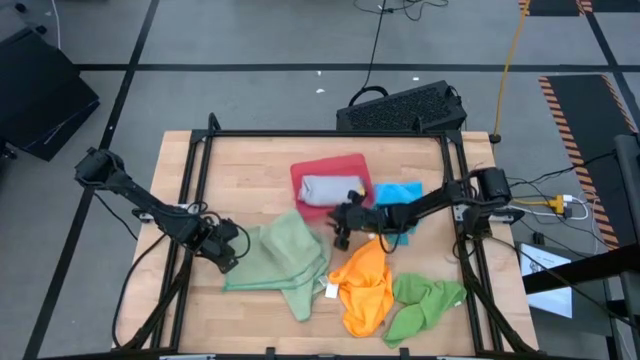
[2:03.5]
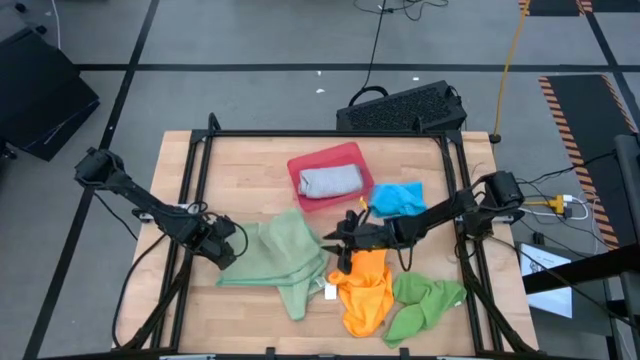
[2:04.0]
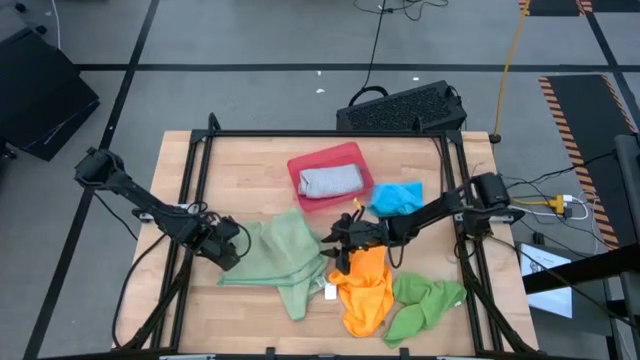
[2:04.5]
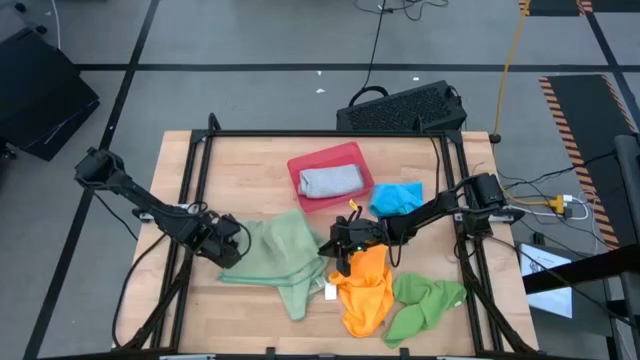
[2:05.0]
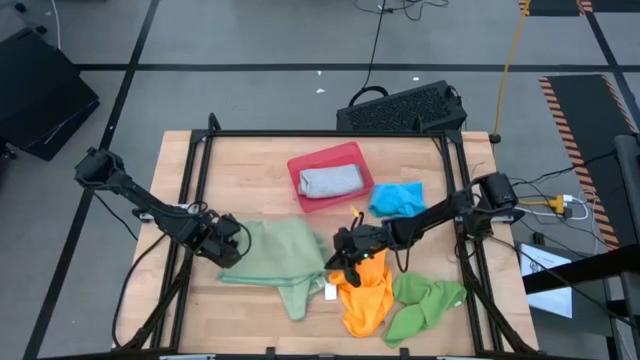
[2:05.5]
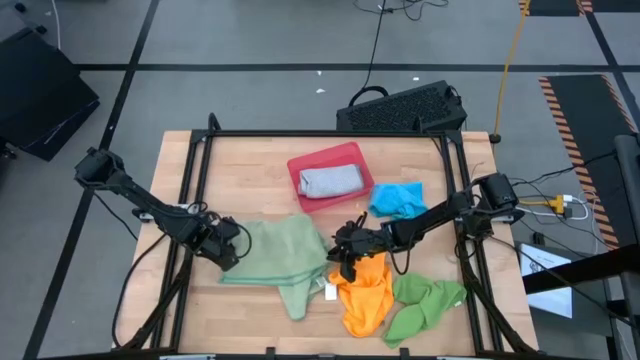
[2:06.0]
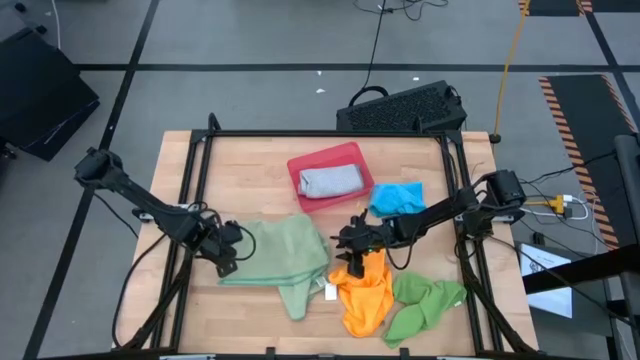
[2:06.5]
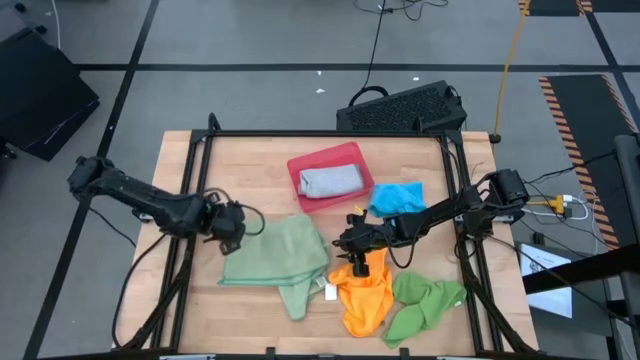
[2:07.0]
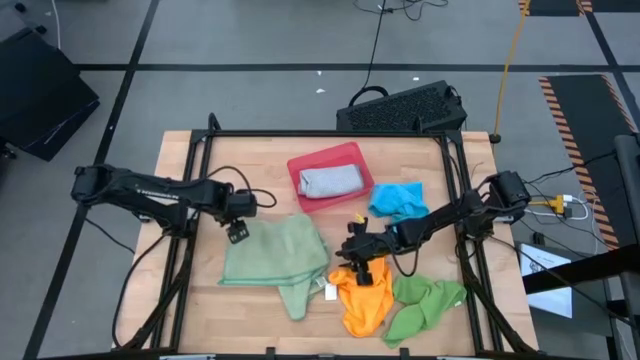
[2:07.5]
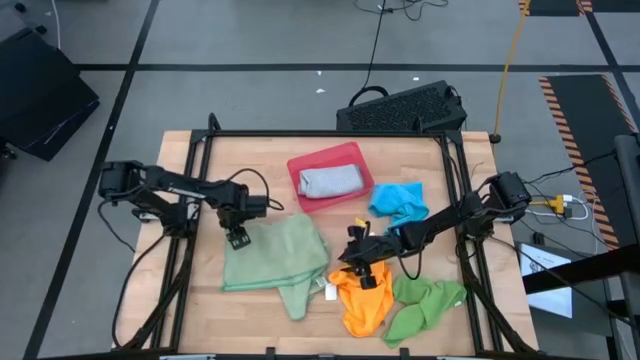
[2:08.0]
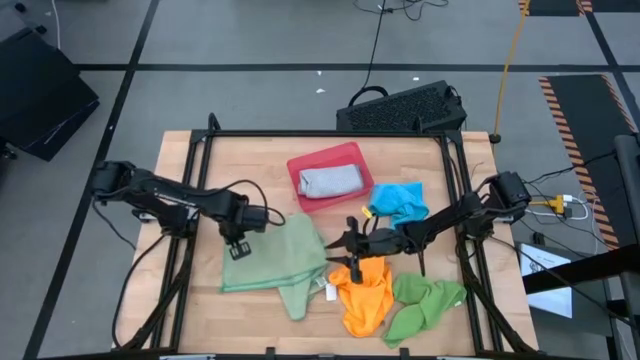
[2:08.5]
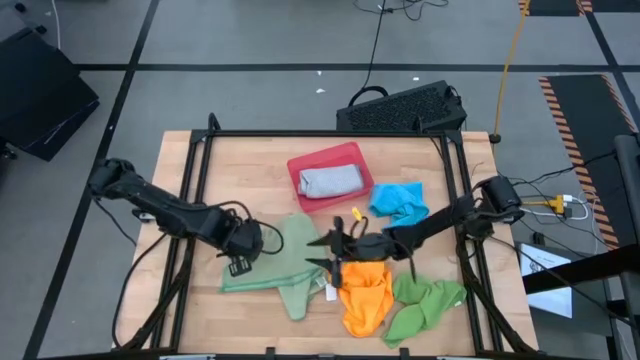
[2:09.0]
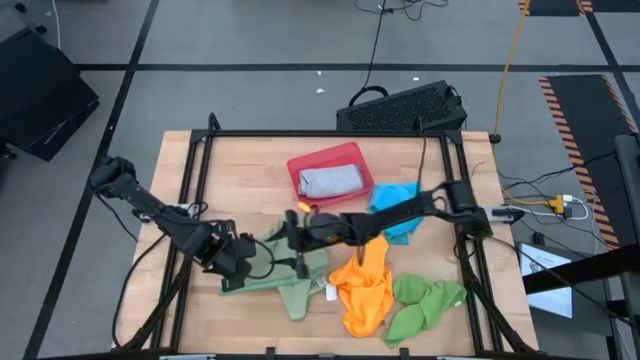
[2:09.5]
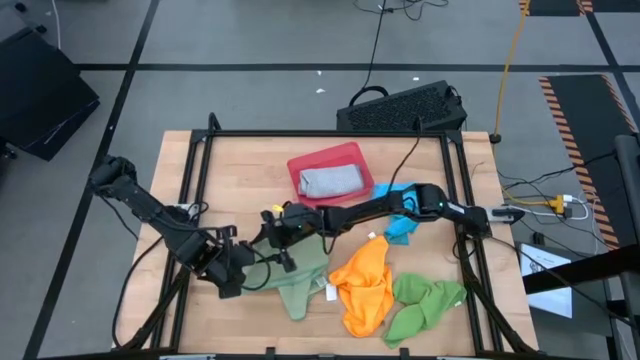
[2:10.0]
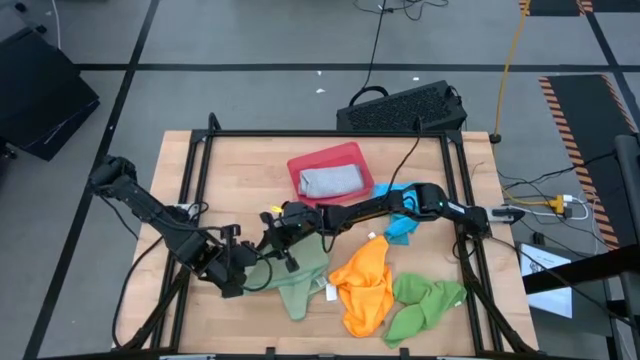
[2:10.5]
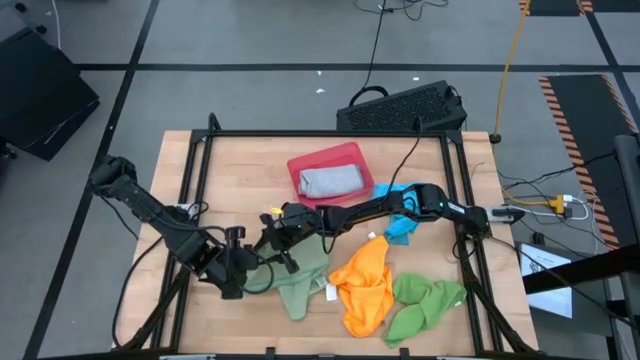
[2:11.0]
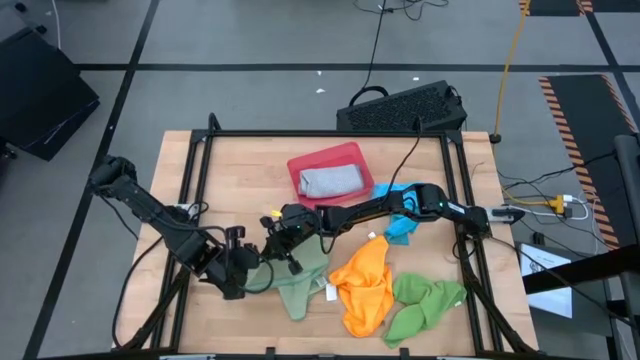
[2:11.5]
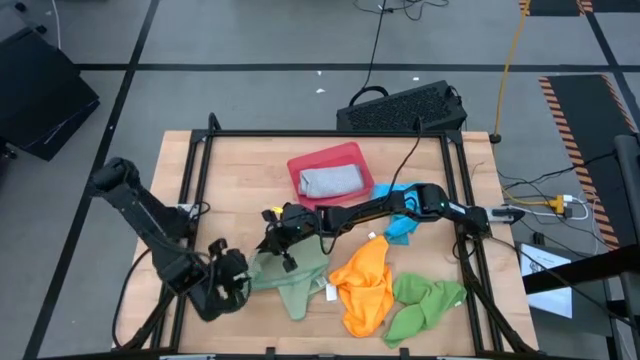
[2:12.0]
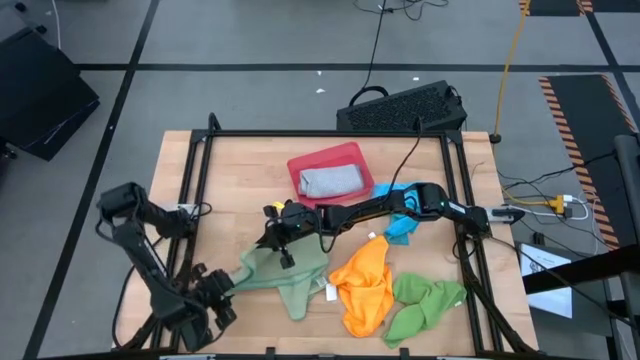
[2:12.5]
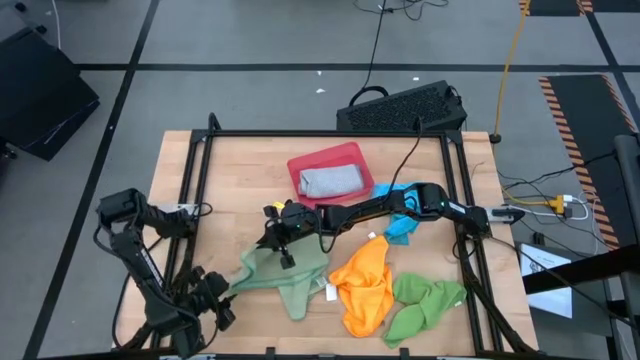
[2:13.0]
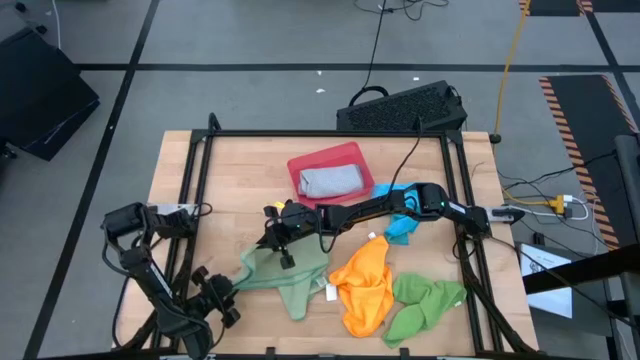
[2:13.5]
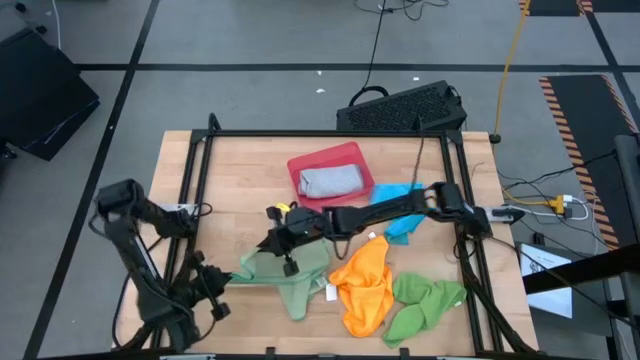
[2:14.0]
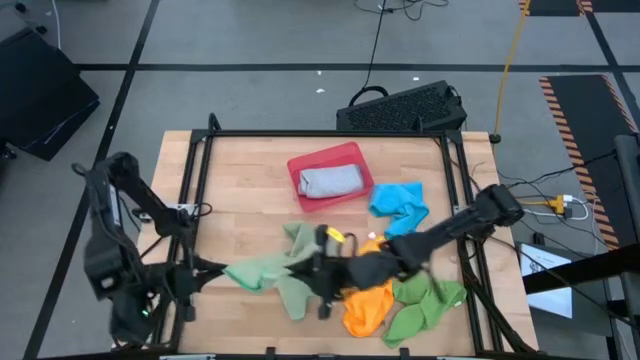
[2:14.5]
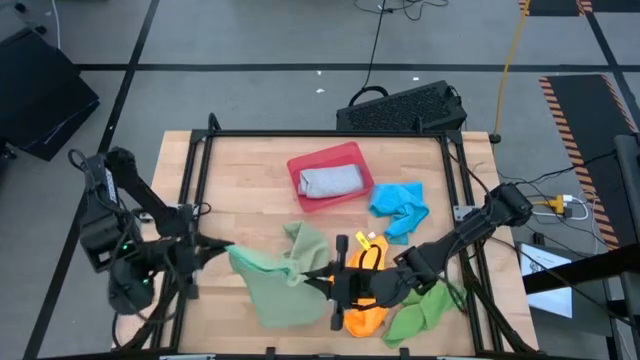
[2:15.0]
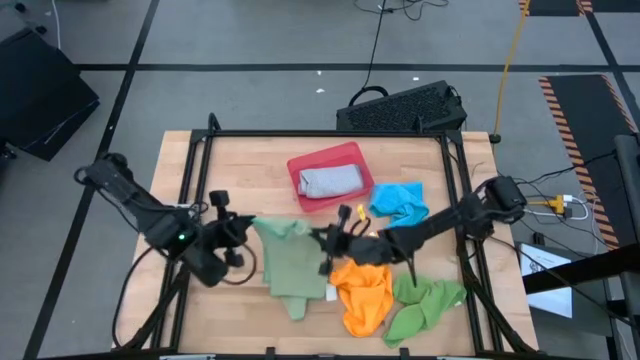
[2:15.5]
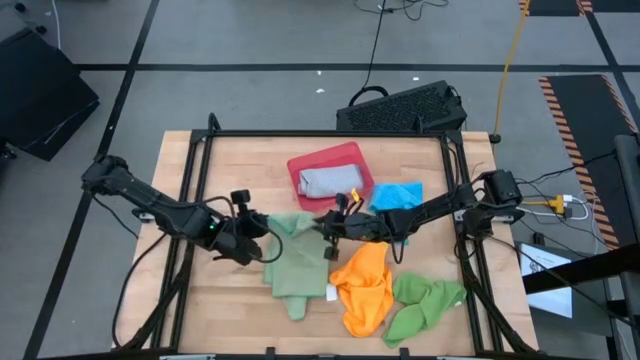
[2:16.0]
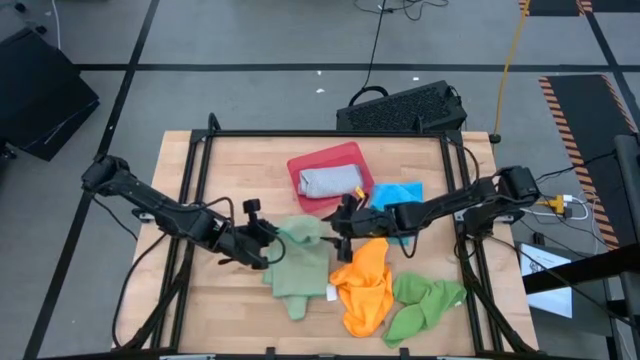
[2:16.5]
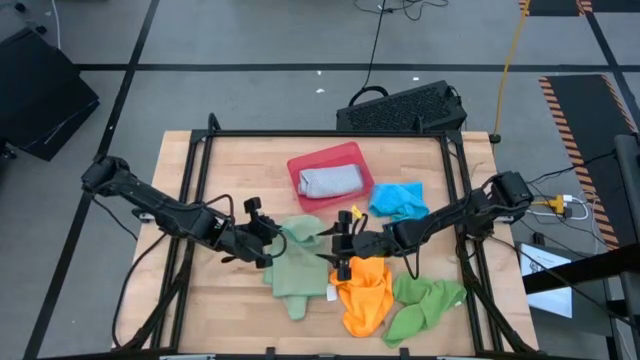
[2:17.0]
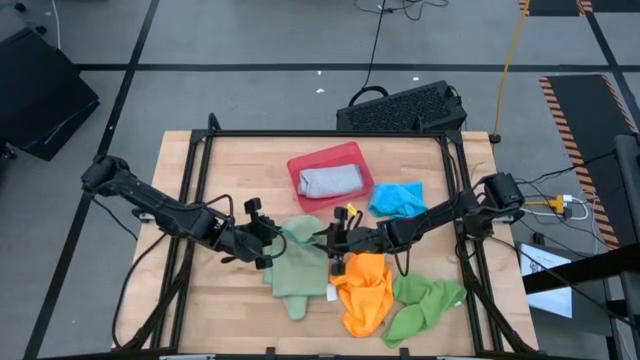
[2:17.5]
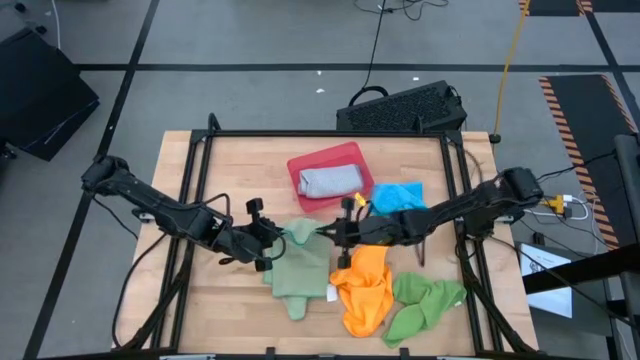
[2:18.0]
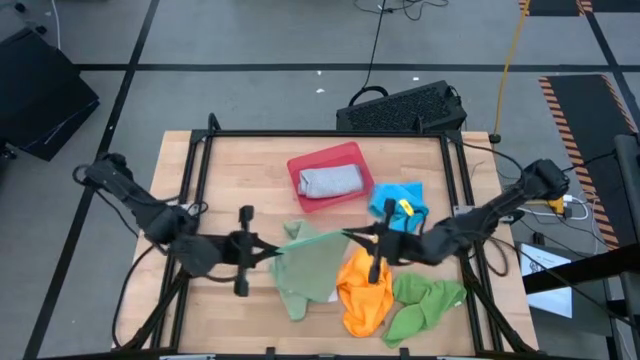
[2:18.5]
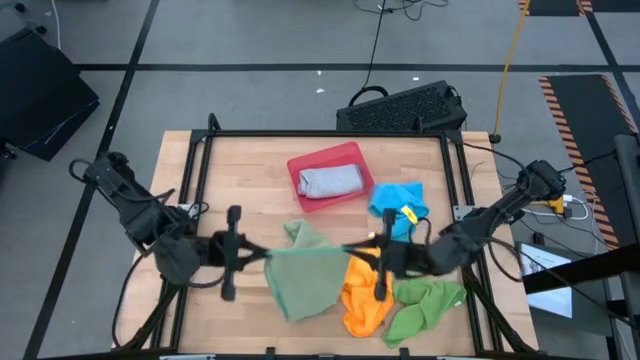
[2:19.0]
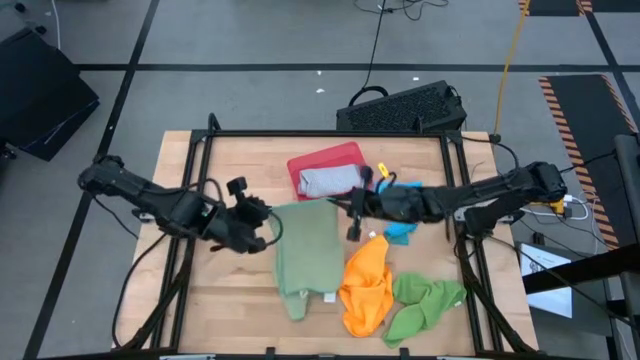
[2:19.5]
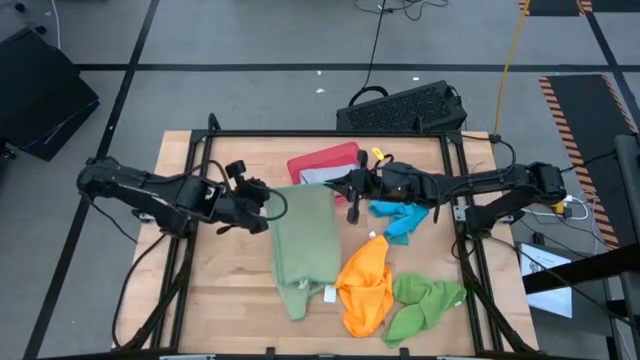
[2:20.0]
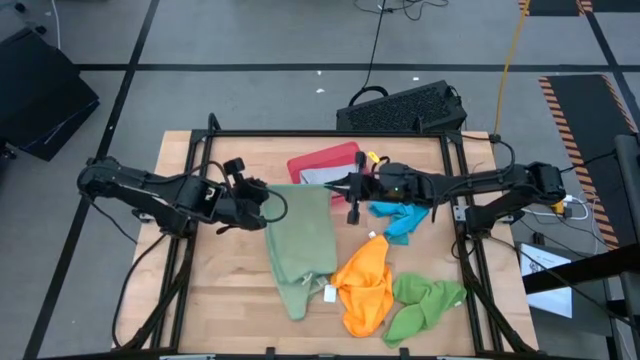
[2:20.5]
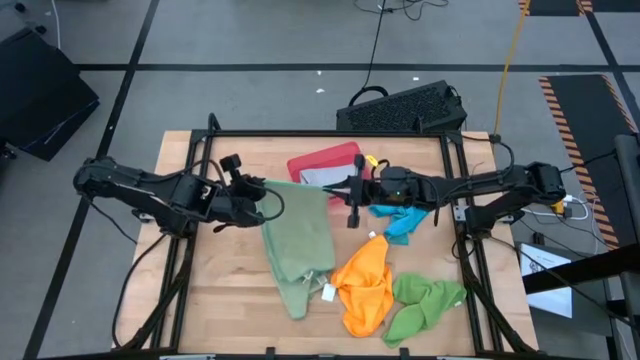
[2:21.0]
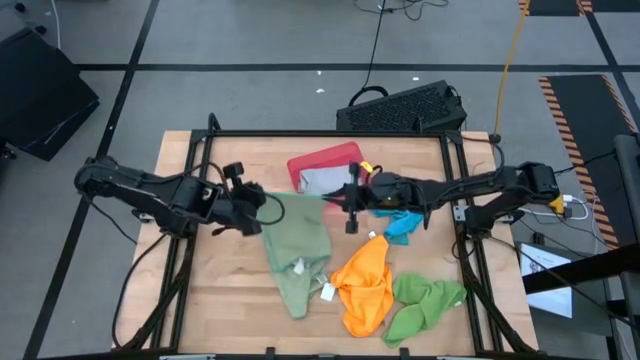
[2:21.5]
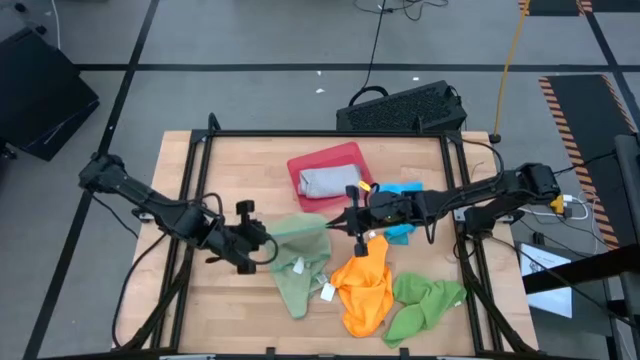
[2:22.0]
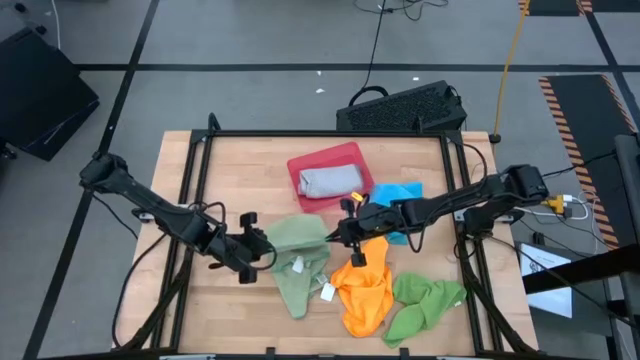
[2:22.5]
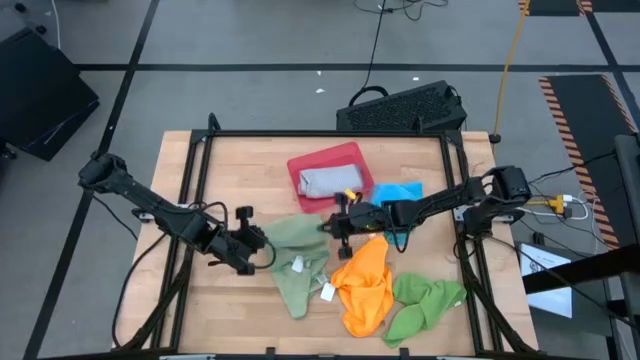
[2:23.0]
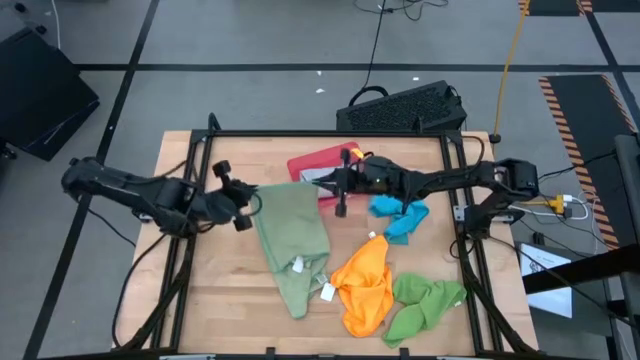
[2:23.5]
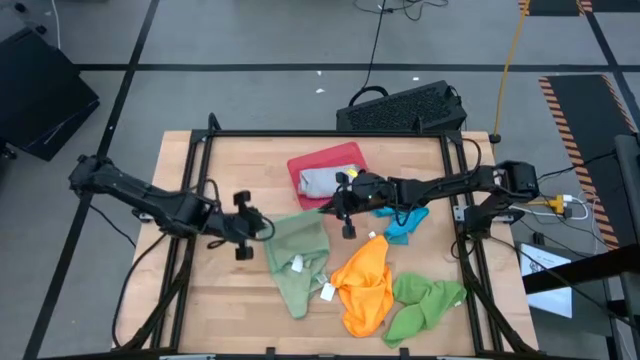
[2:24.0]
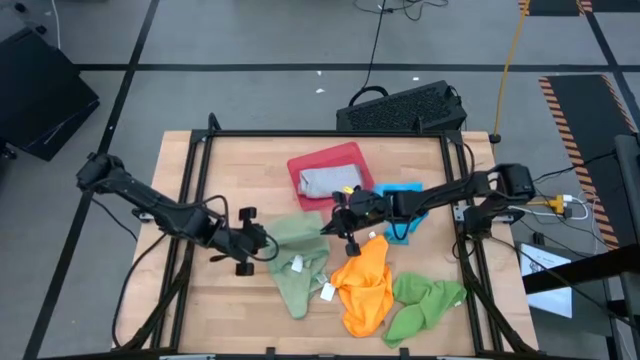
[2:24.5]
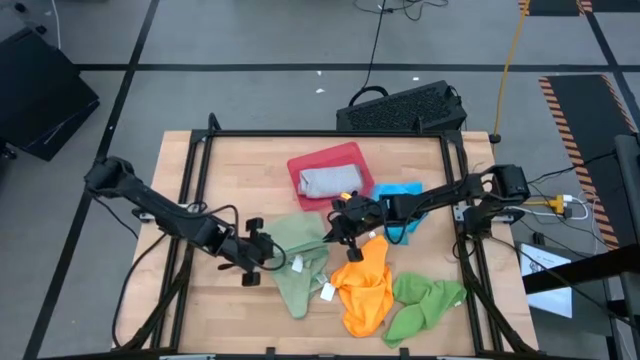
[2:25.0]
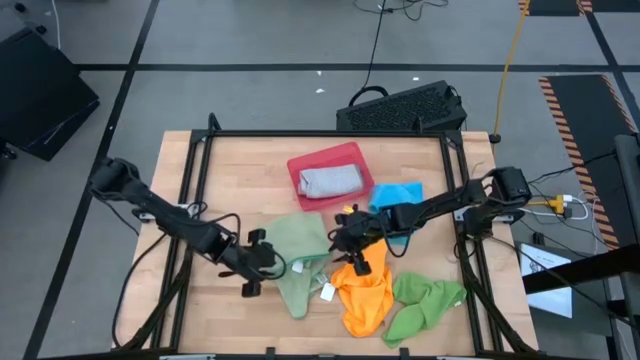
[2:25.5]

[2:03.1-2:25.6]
Task: Fold microfiber towels
Fold the light green microfiber cloth
